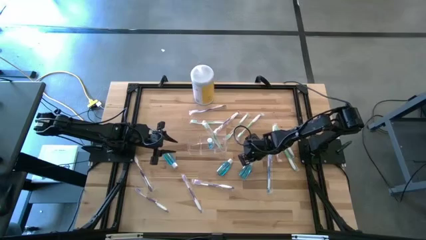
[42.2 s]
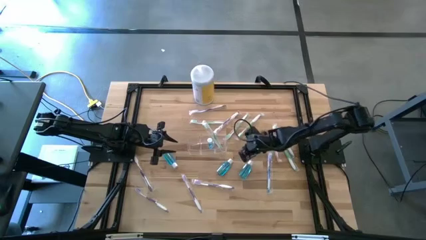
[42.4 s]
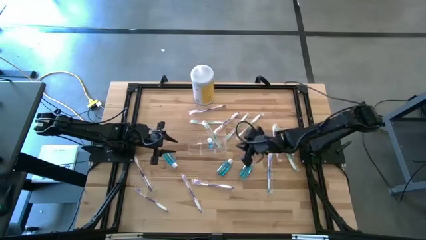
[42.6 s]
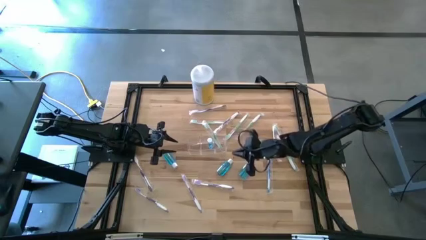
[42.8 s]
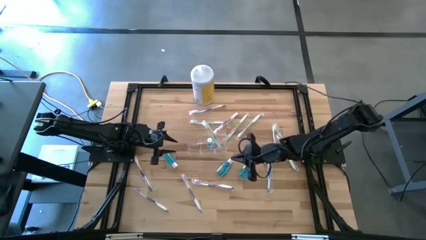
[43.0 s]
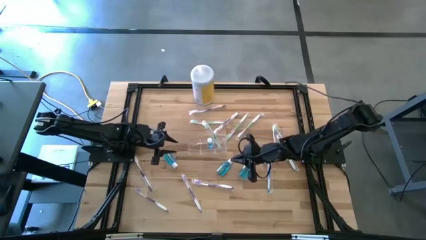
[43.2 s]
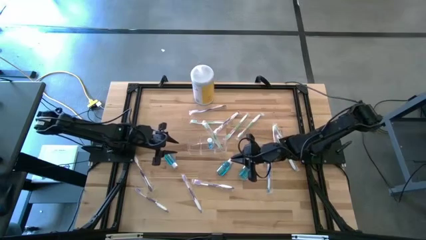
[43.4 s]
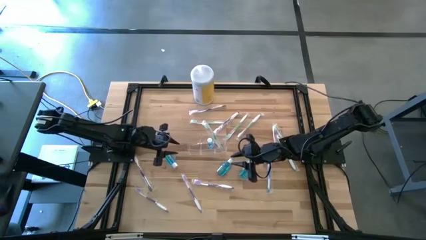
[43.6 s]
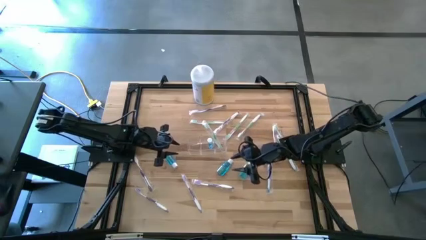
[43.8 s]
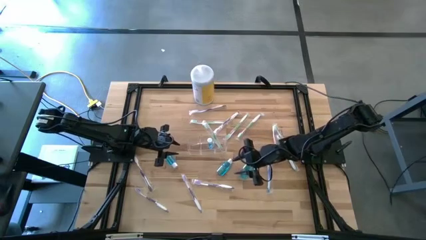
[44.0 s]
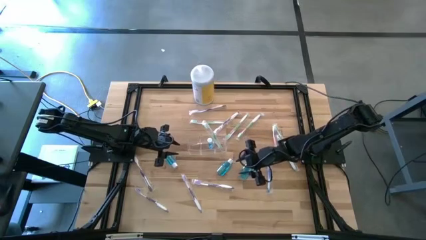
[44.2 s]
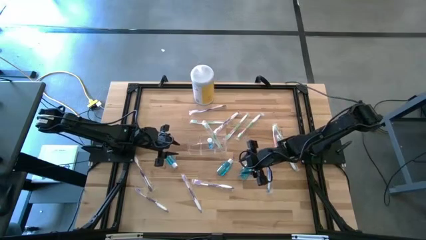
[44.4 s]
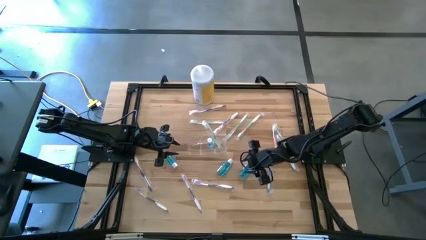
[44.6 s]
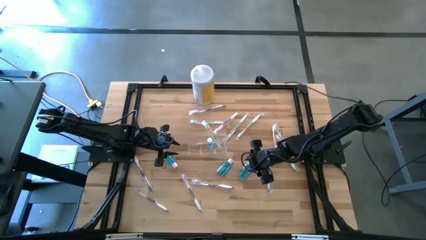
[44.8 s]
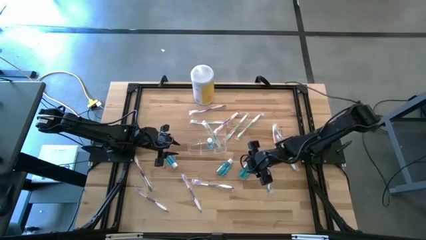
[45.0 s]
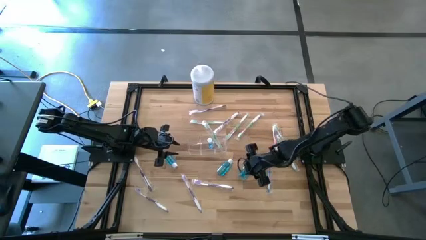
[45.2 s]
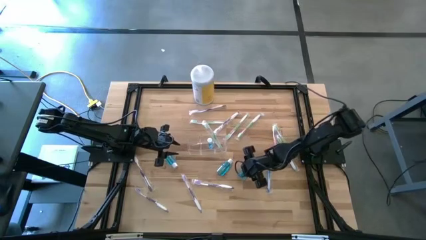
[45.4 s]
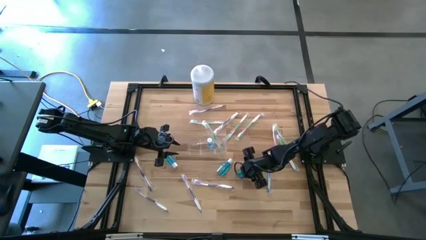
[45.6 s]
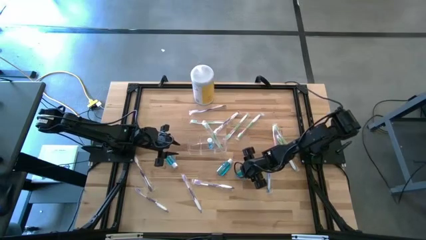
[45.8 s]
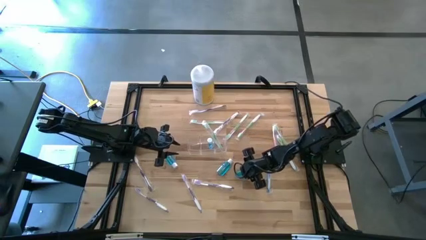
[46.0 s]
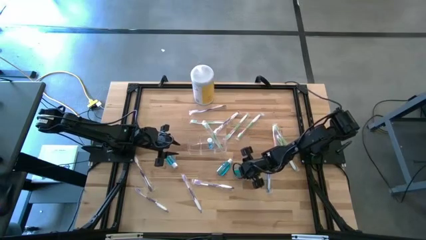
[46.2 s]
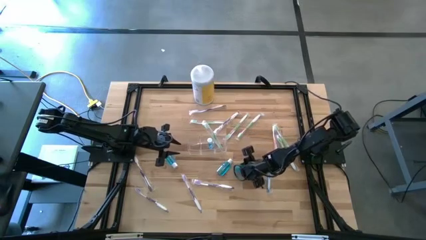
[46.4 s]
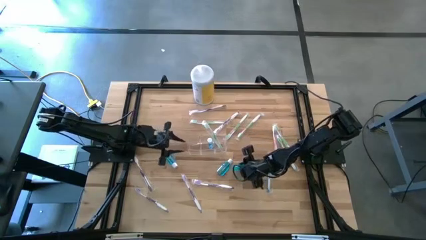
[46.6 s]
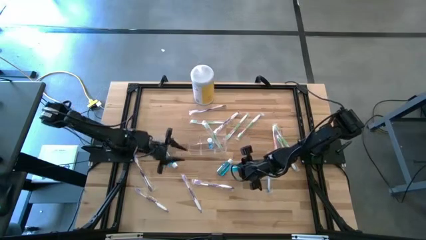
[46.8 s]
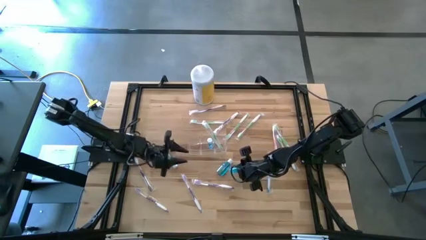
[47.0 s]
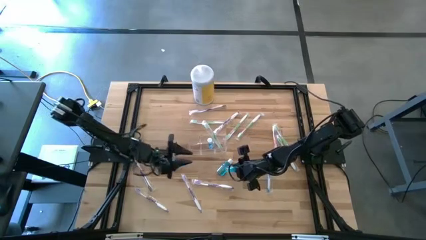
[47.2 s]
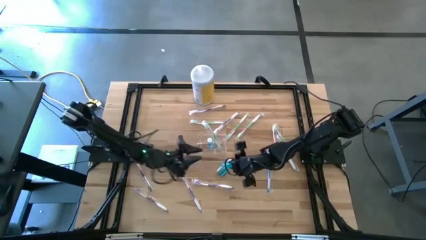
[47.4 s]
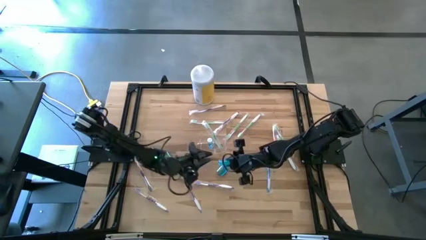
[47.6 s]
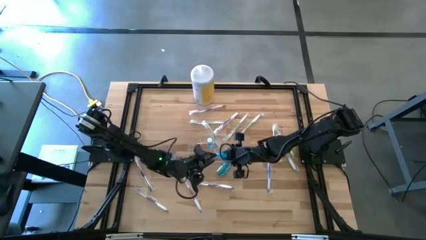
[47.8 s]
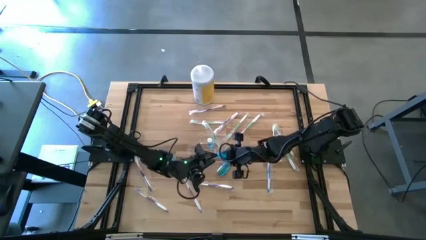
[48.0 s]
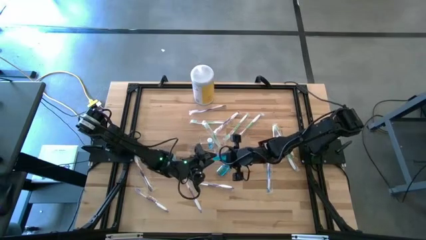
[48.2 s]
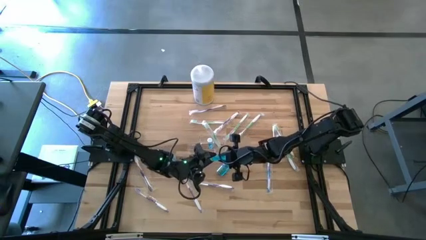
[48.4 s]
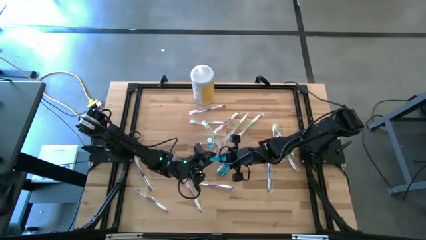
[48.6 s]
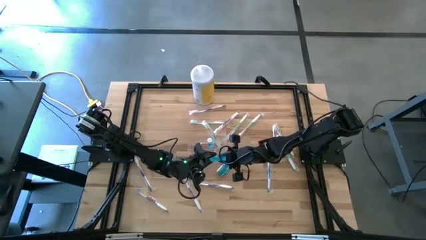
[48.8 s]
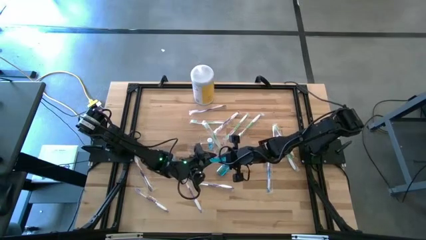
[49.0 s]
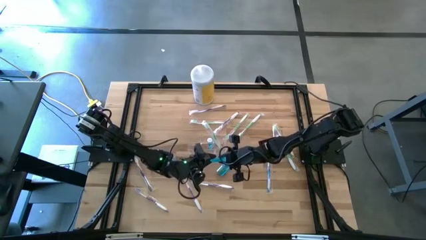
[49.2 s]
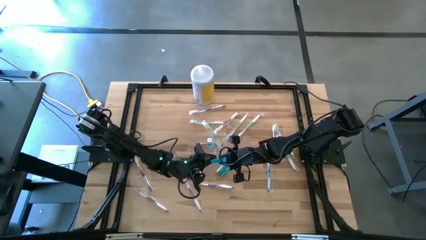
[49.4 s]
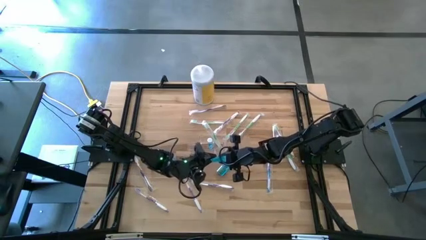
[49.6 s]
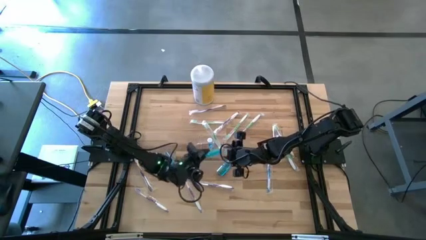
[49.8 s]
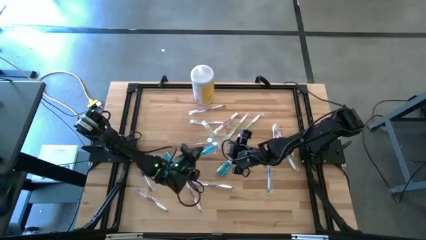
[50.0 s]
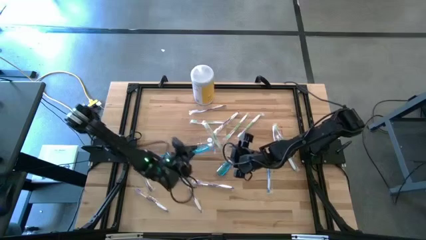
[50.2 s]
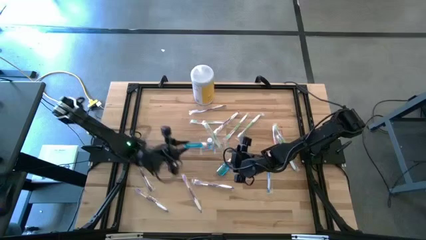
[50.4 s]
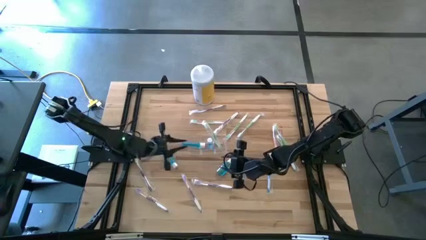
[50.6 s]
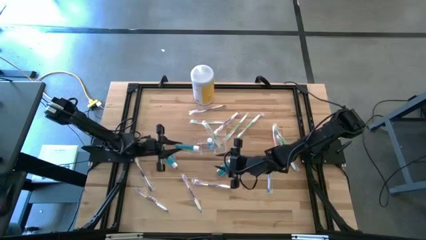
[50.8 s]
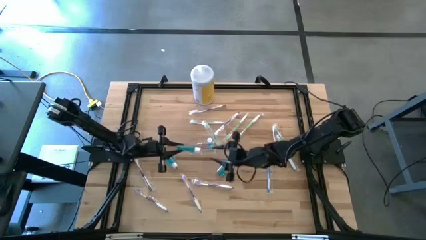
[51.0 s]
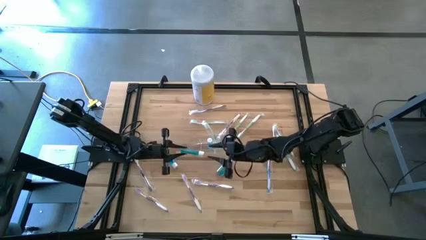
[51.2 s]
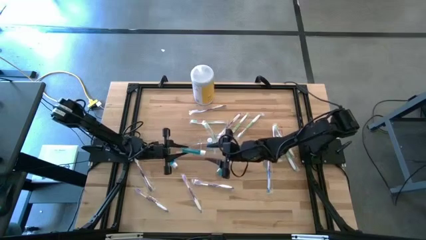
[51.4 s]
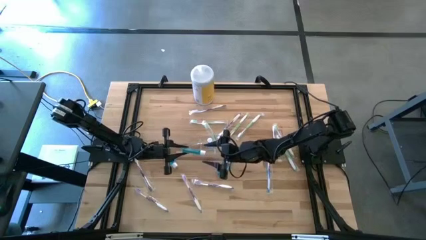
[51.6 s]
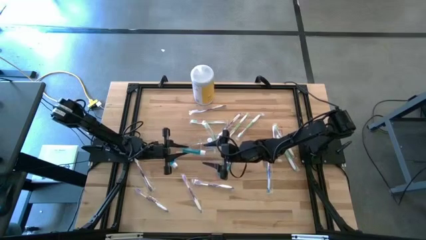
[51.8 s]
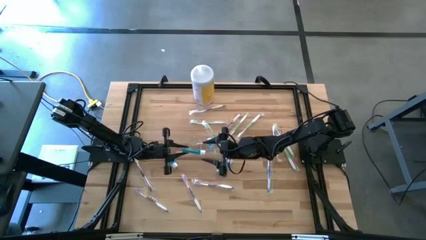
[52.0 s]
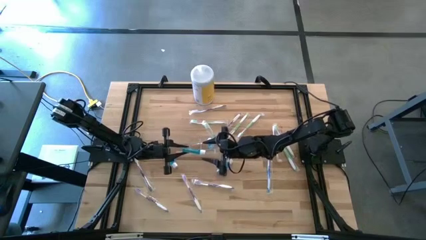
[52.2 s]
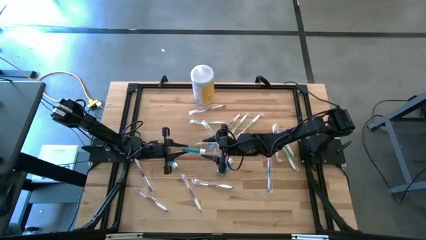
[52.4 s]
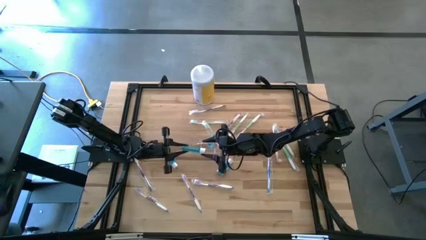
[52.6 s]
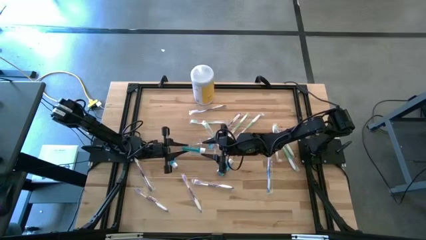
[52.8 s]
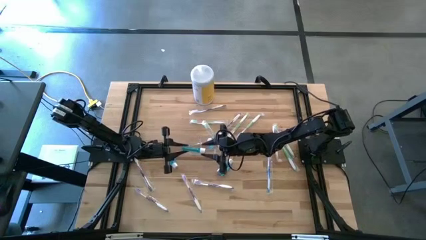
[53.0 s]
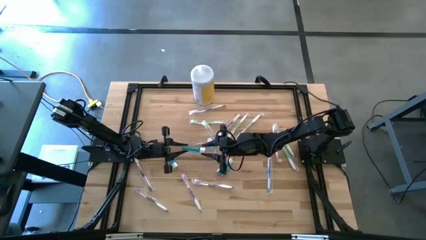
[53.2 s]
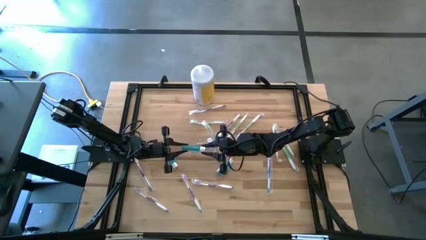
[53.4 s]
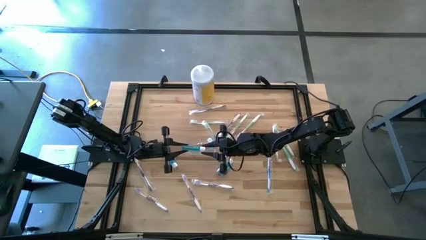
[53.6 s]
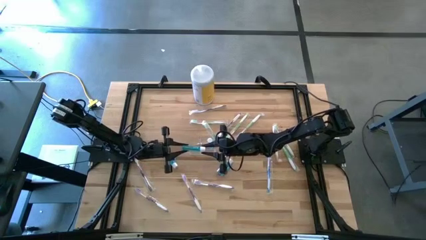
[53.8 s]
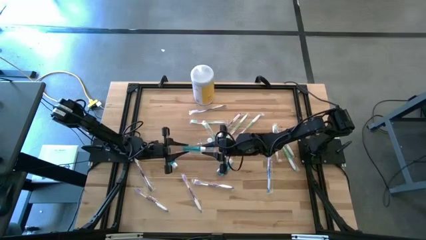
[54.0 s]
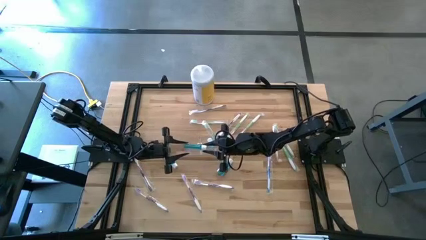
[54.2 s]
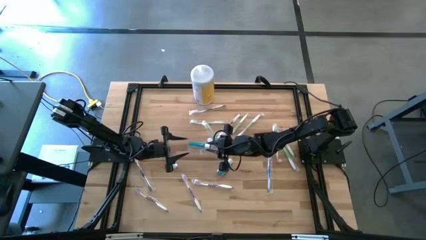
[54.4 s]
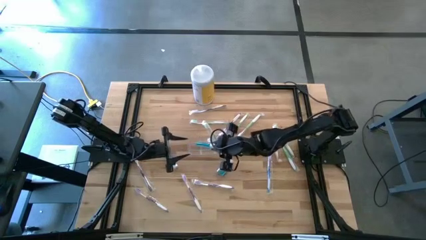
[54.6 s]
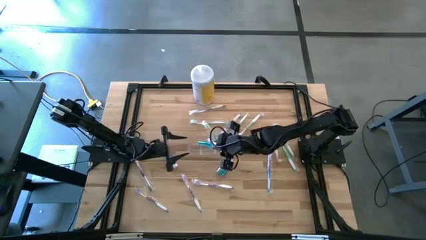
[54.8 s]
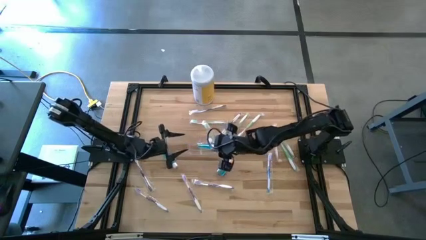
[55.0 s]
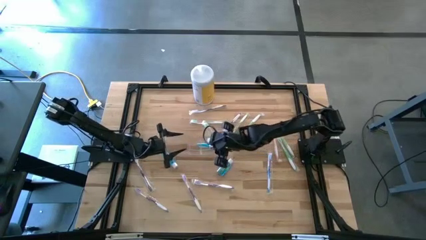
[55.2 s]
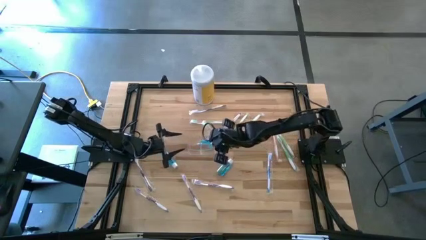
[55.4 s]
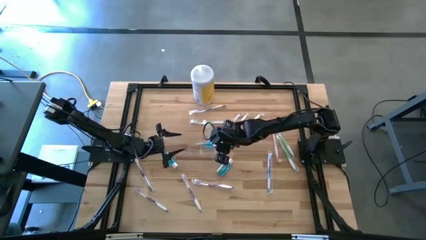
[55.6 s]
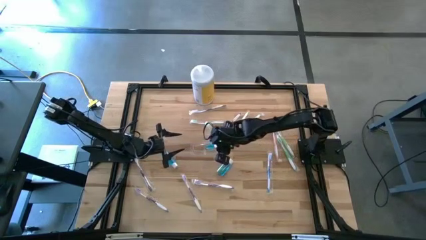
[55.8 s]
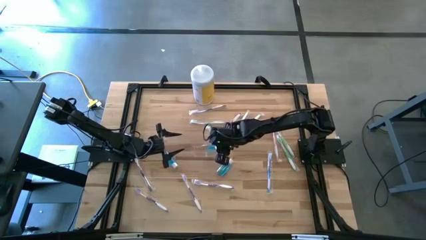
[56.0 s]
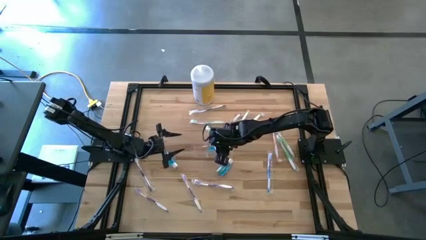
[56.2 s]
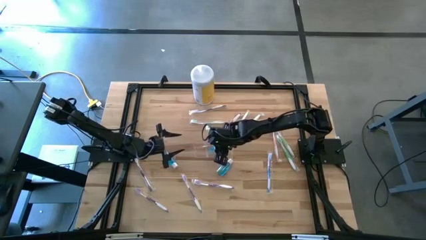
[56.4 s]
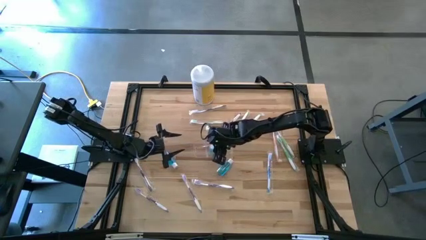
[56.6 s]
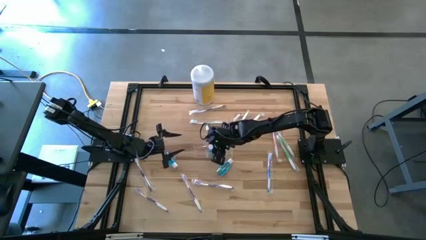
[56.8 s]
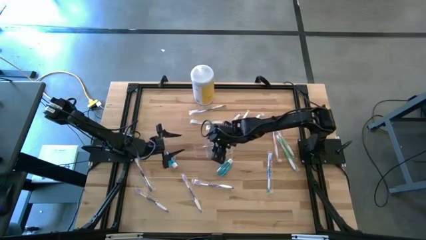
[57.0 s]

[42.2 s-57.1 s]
Task: Pick & Place toothbrushing station
Put the mouthwash bottle into the transparent organizer
